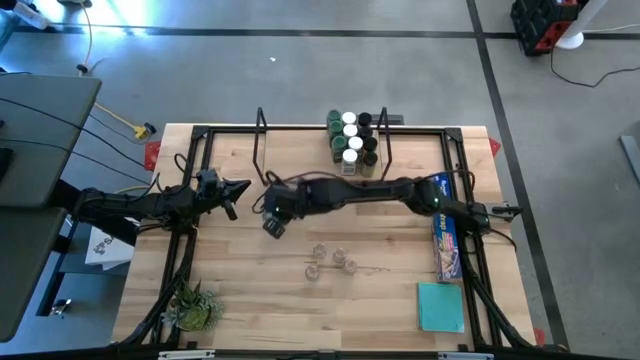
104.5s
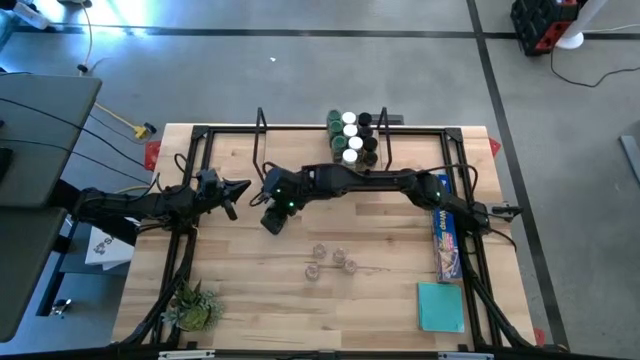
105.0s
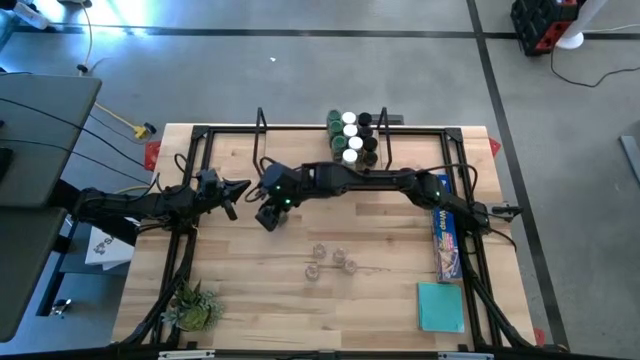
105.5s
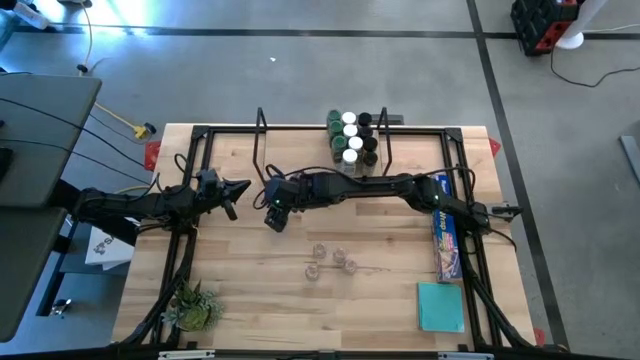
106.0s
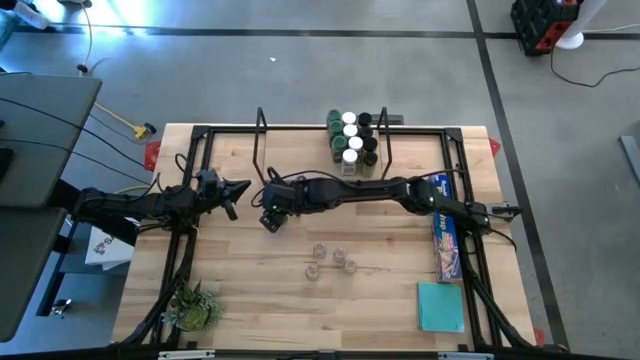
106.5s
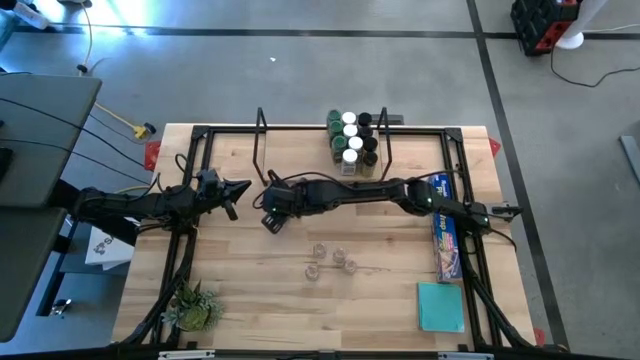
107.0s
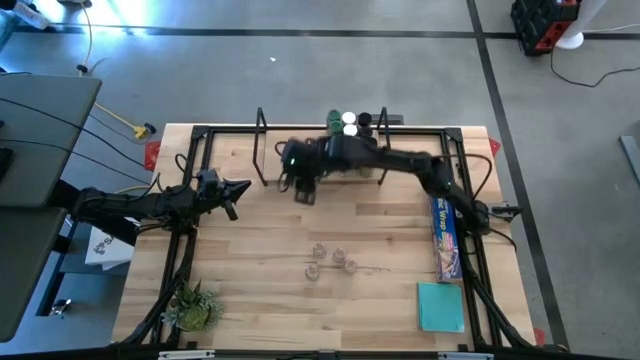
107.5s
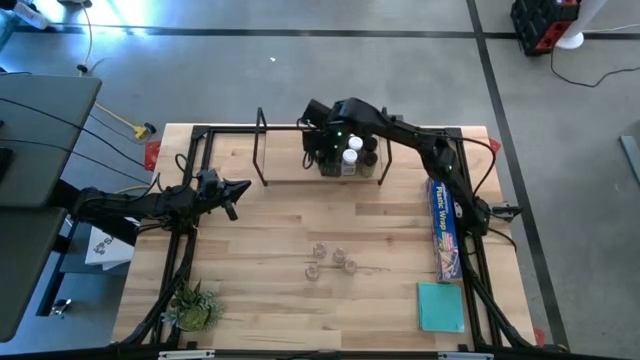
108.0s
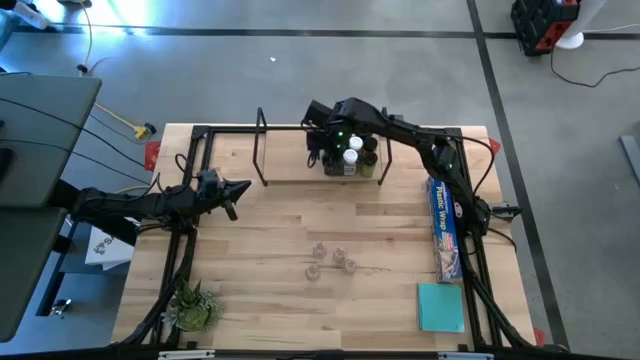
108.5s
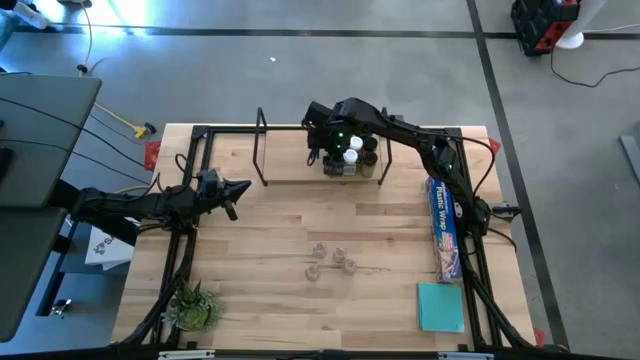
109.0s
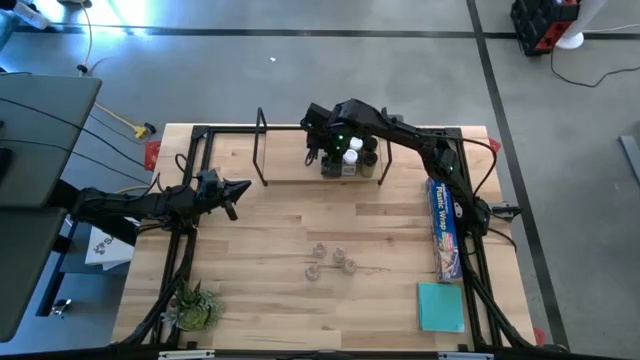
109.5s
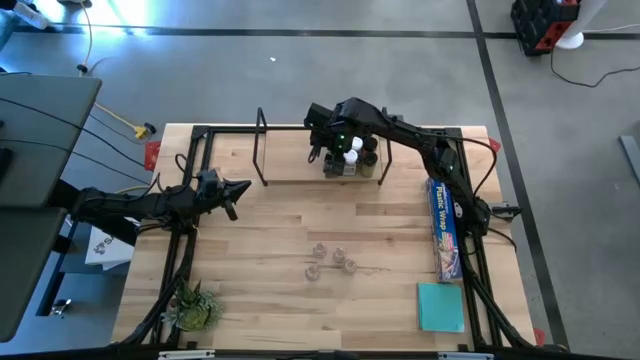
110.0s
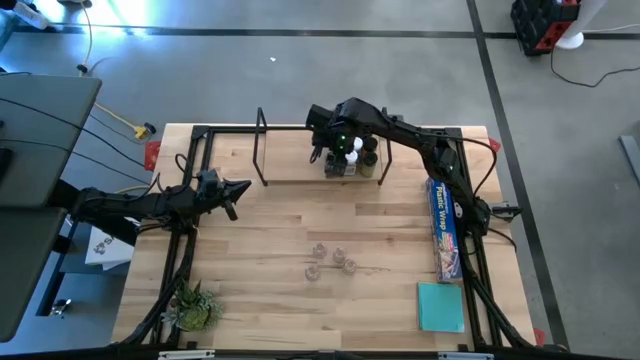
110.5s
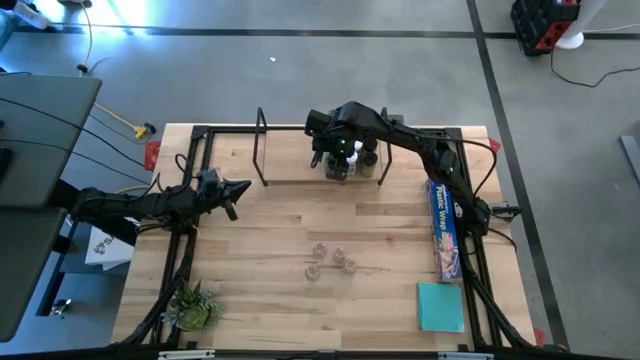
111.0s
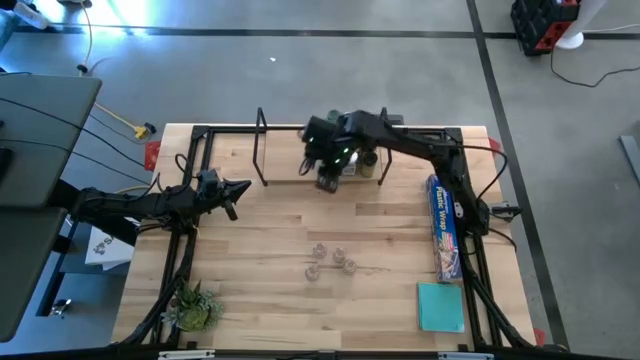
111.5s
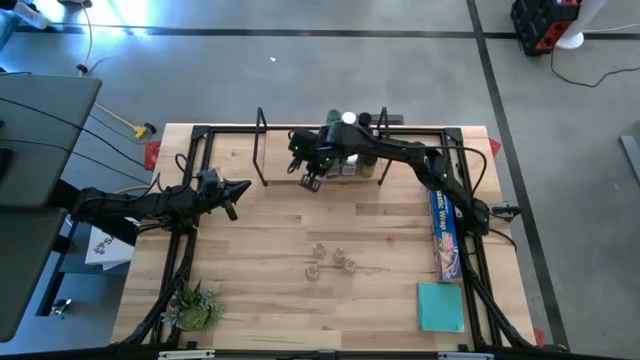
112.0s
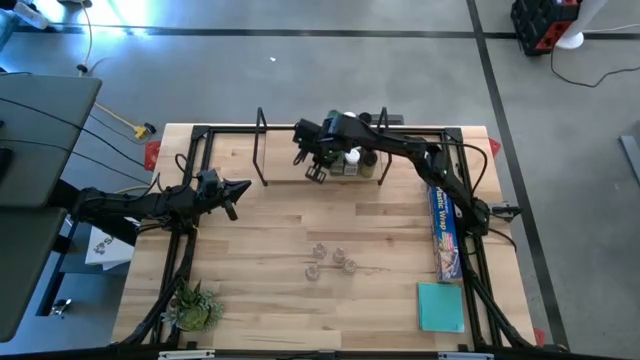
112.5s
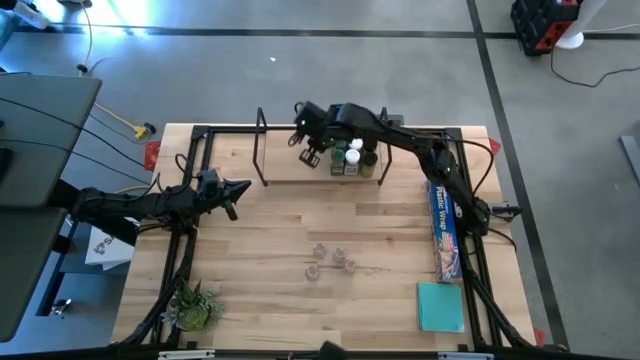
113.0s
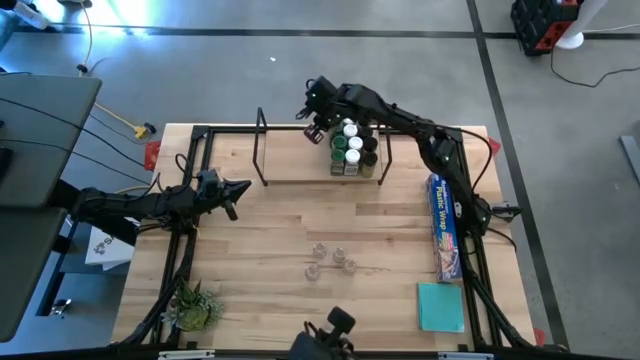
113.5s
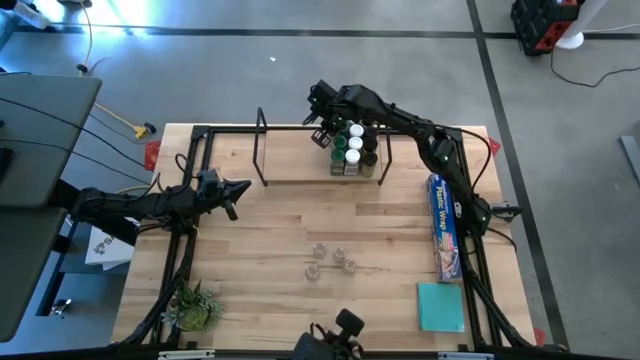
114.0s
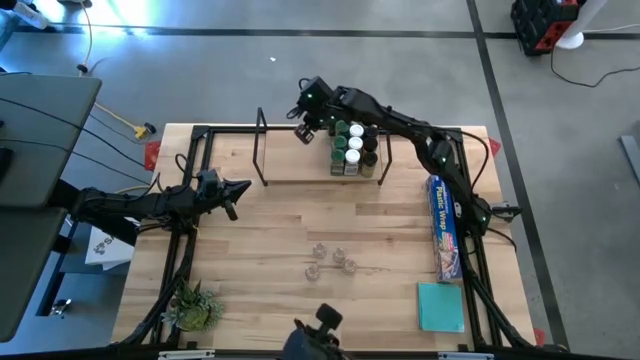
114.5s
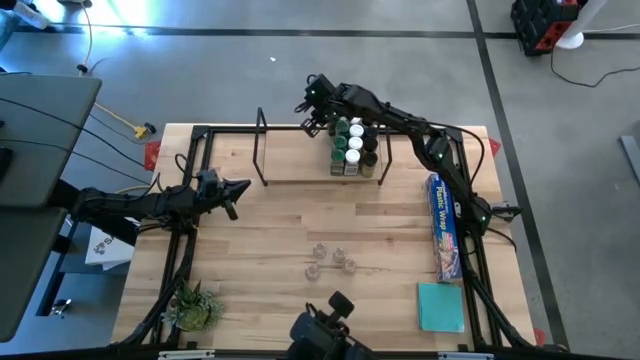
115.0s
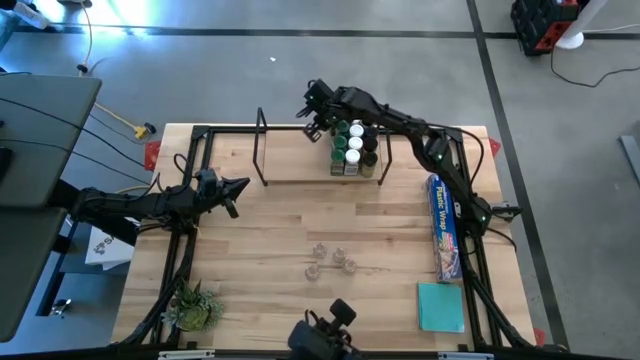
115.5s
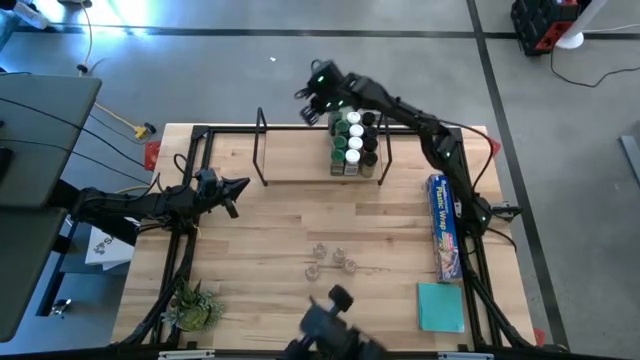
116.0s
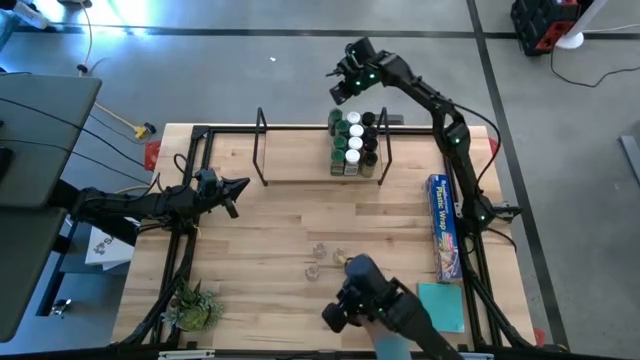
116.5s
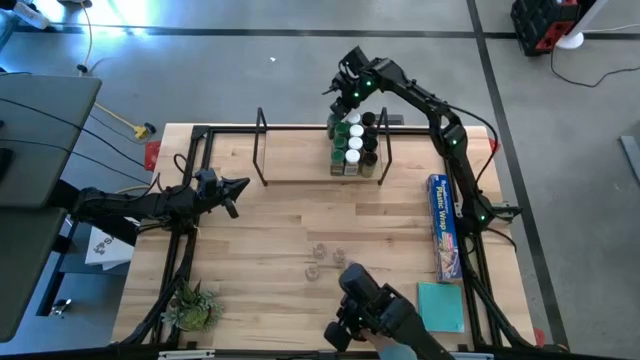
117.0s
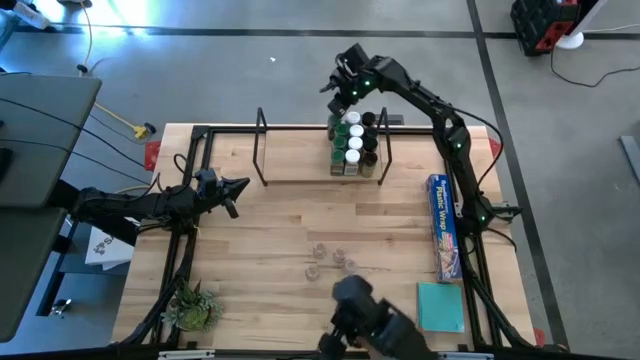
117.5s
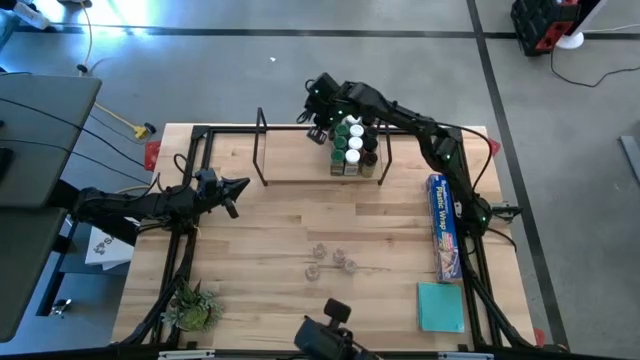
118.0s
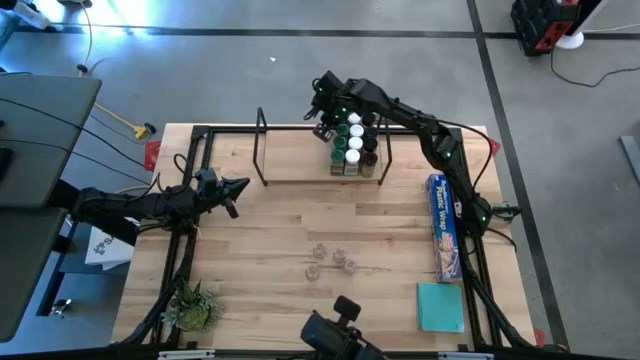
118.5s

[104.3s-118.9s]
Task: Shelf spices
Put the green seasoning bottle on the shelf and align with the other green seasoning bottles

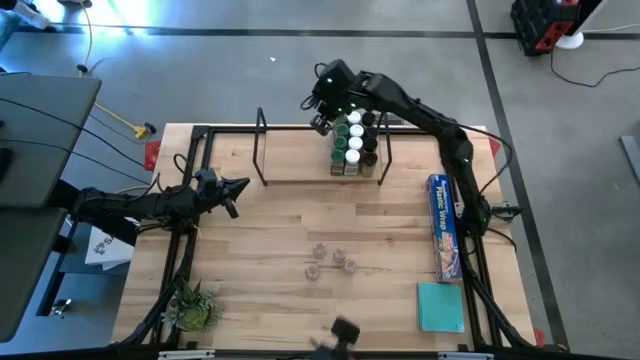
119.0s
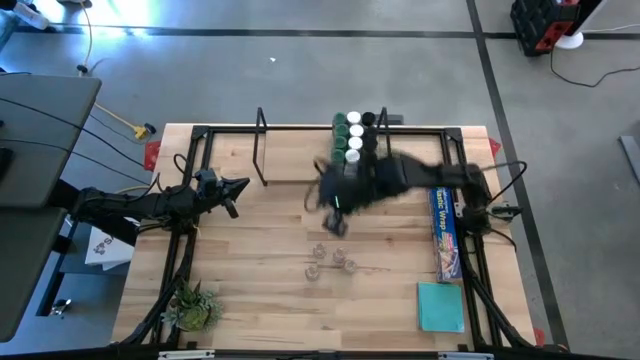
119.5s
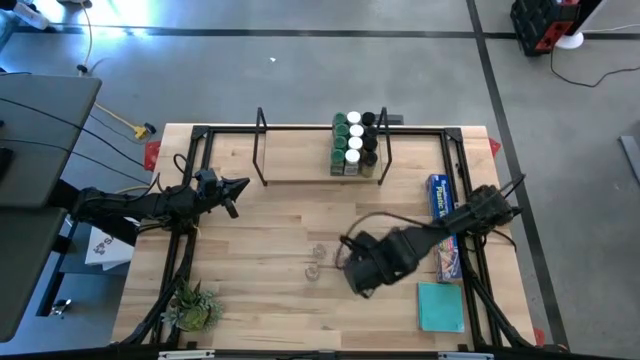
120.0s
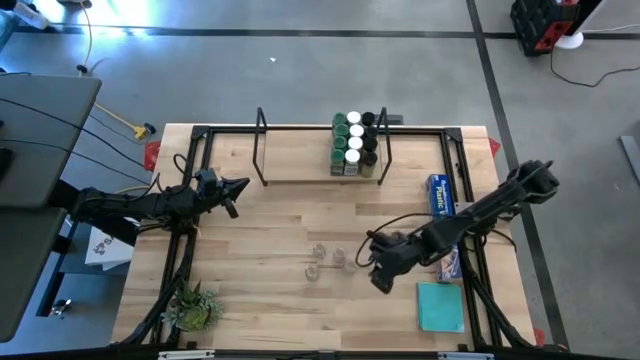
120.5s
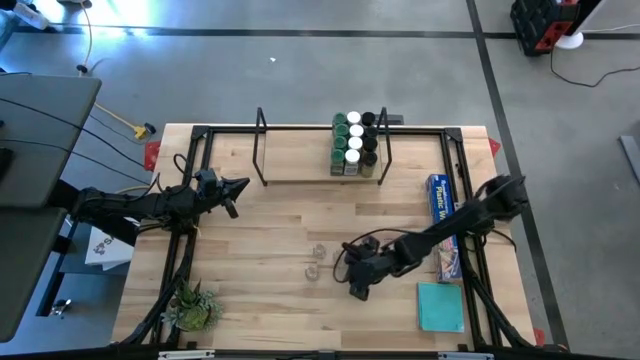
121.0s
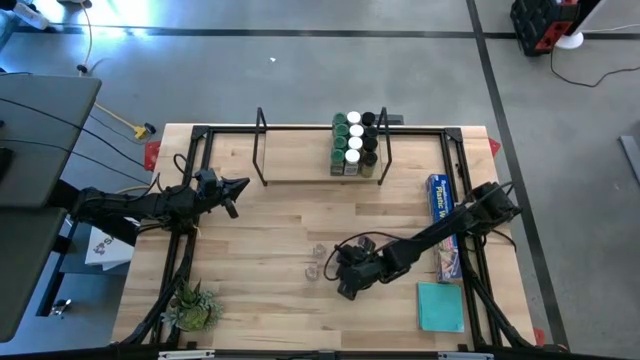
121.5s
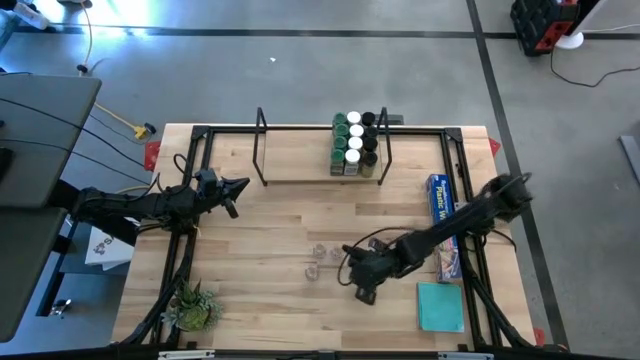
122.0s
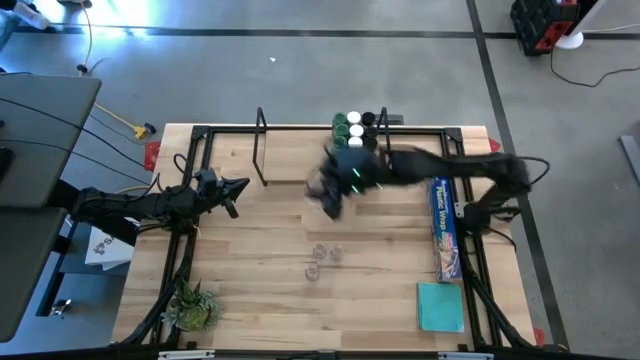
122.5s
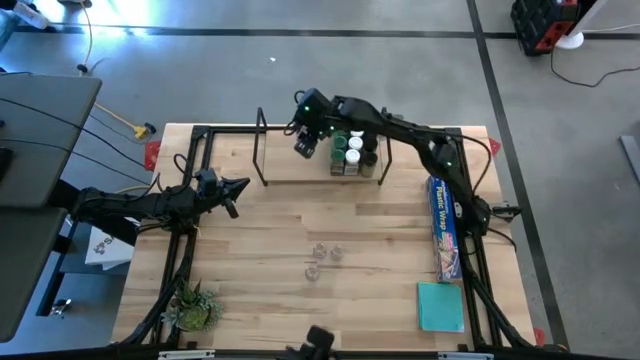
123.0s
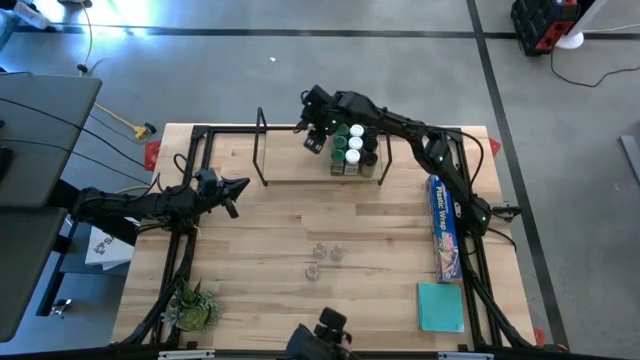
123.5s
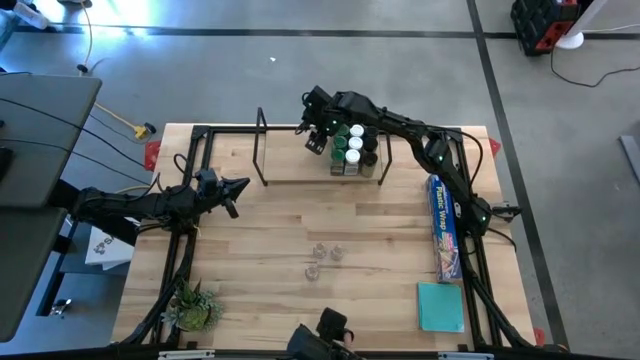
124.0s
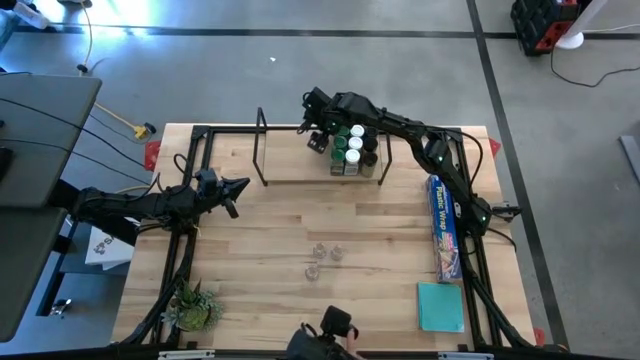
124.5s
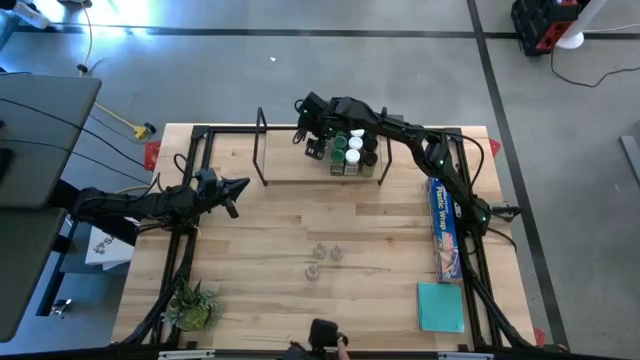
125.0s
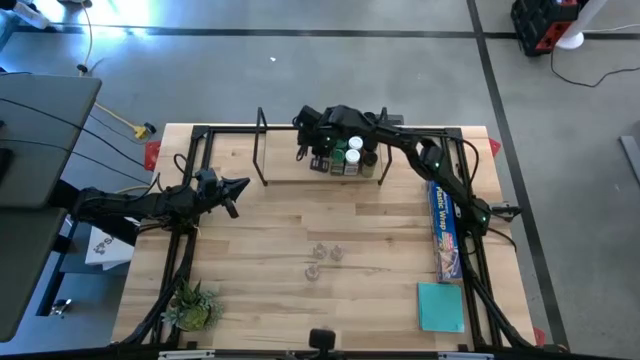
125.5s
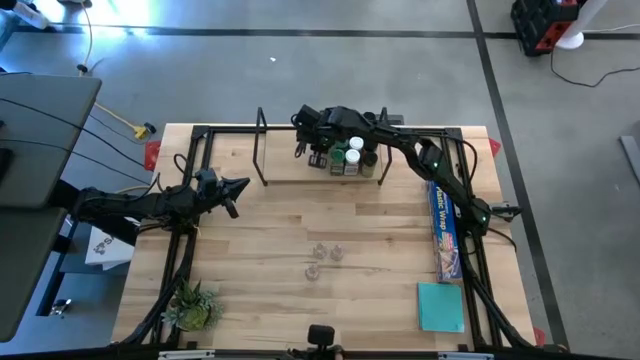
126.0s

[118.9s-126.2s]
Put the bottom right brown seasoning bottle on the shelf
